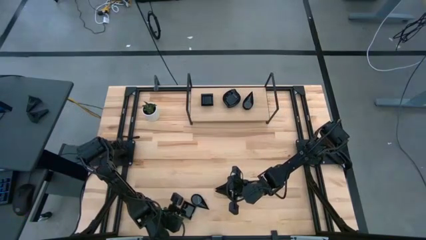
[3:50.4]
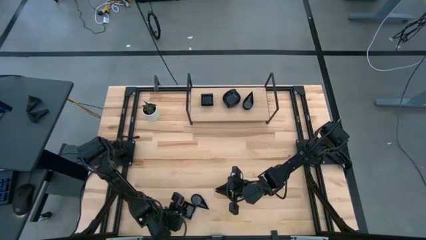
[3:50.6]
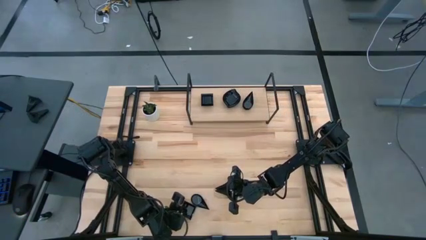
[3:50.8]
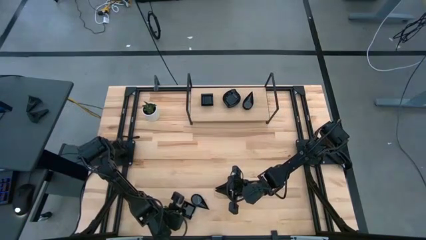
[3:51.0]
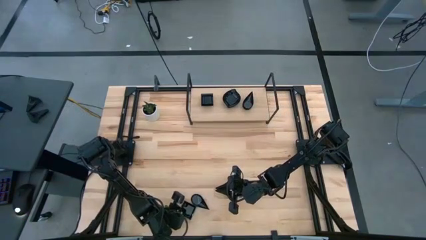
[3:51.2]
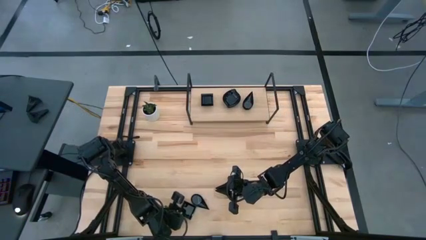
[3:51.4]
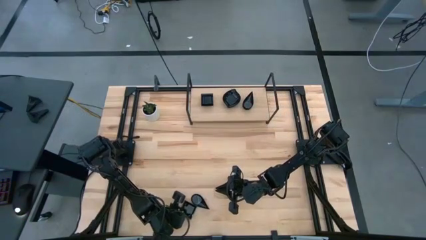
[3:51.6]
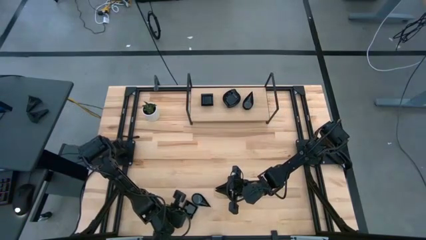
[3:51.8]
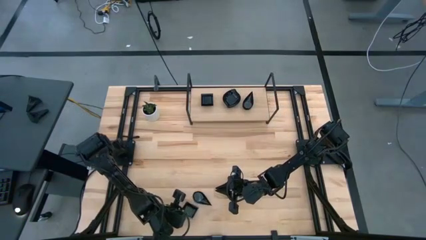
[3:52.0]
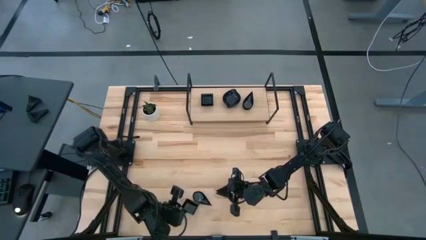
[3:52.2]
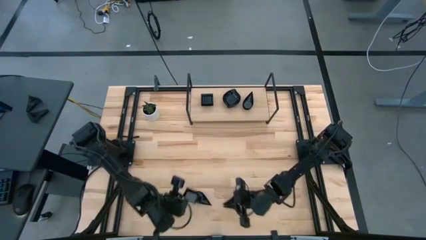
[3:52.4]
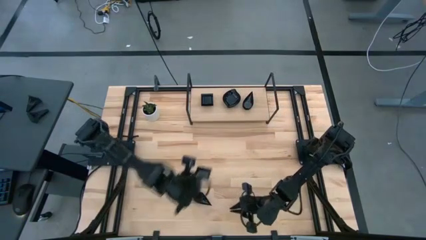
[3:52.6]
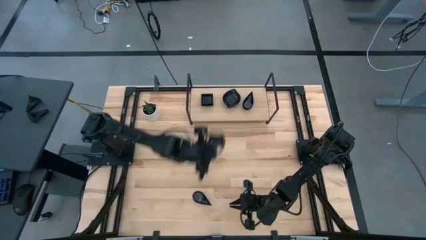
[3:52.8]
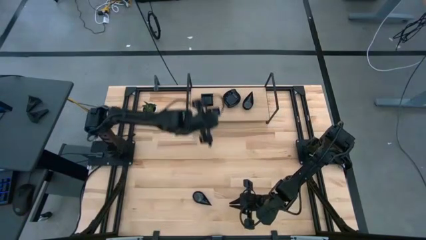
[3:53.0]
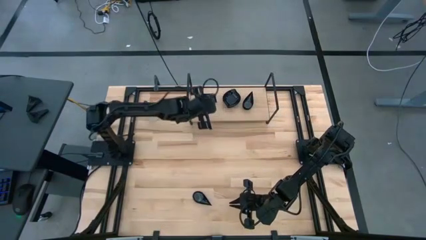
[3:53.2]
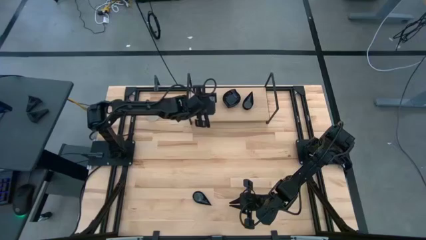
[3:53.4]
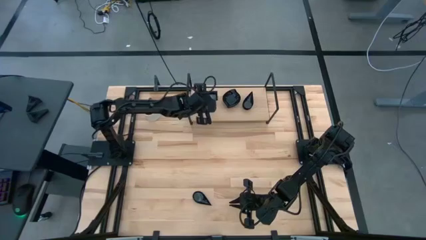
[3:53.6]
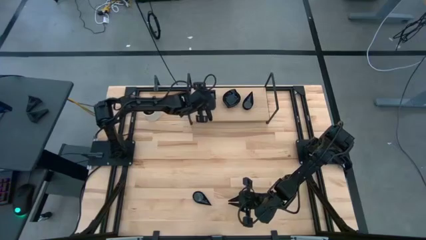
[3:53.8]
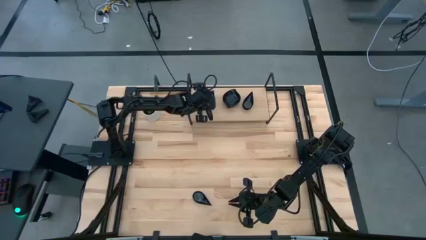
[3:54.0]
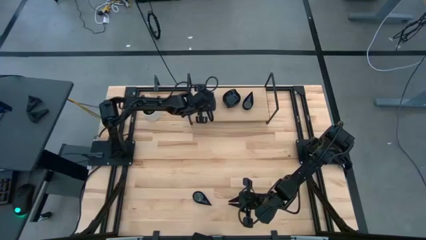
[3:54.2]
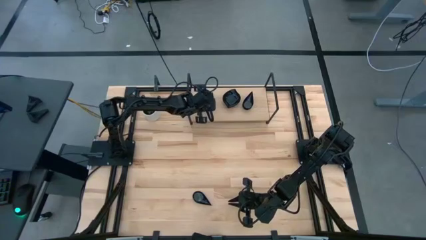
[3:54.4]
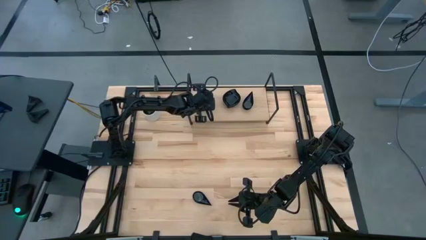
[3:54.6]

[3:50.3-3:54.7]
Task: Pick & Place Mini shaped plates
Stack the black square bowl on top of the other black square bowl on the shelf

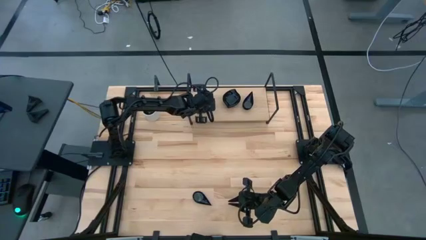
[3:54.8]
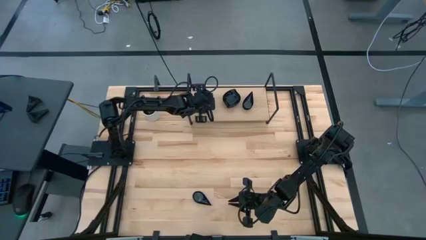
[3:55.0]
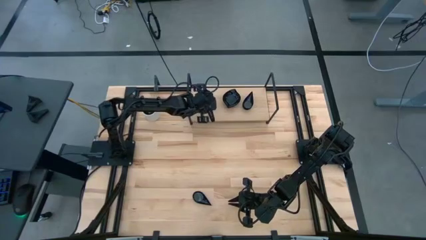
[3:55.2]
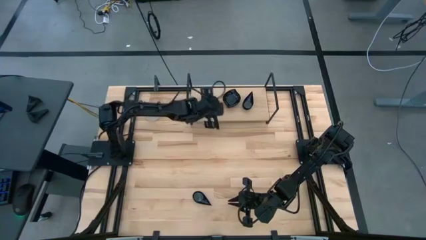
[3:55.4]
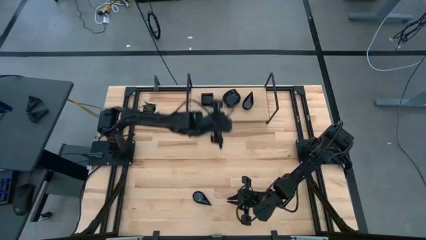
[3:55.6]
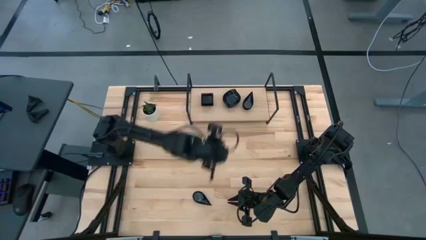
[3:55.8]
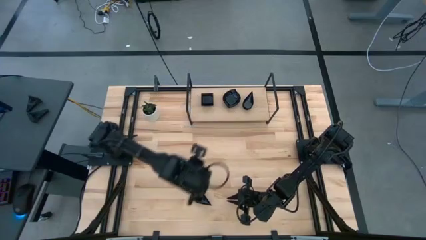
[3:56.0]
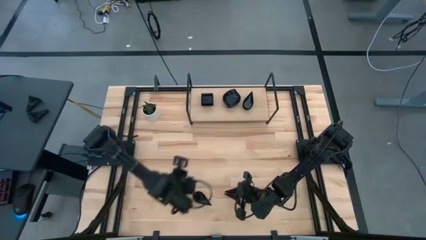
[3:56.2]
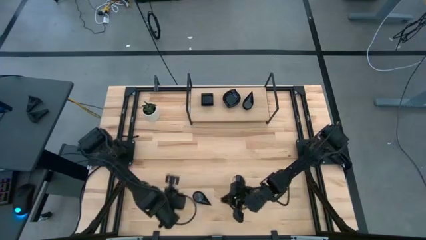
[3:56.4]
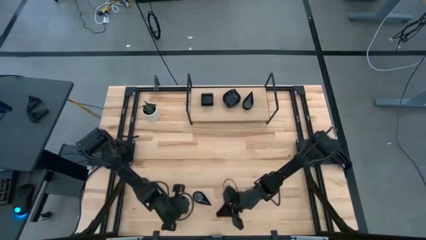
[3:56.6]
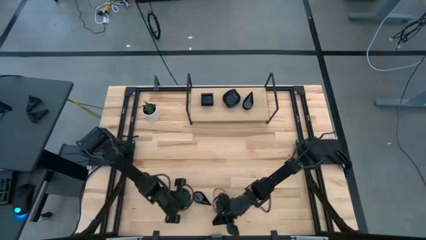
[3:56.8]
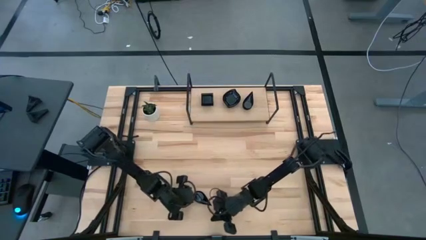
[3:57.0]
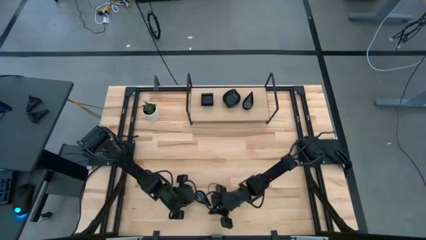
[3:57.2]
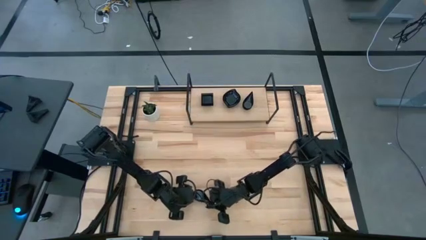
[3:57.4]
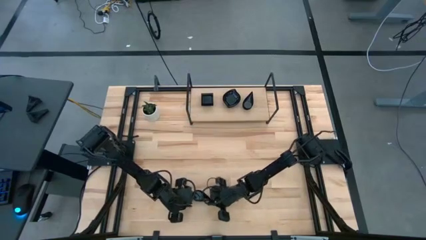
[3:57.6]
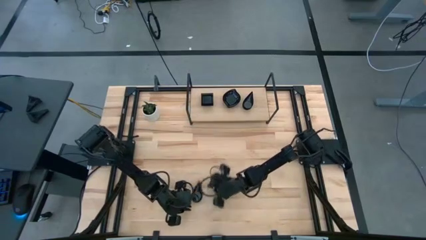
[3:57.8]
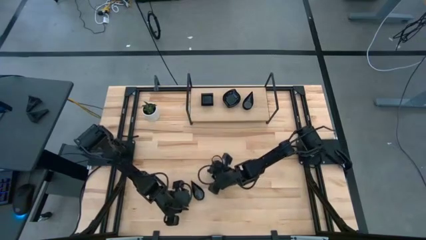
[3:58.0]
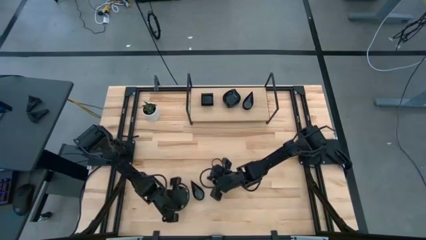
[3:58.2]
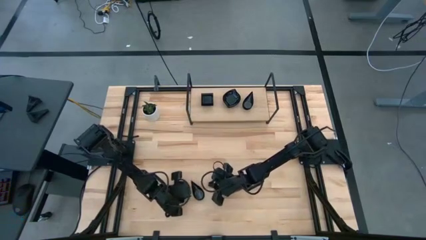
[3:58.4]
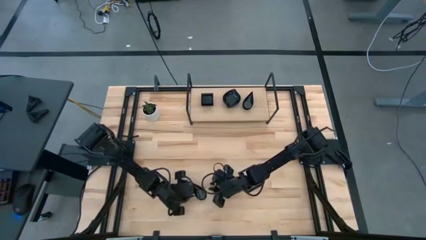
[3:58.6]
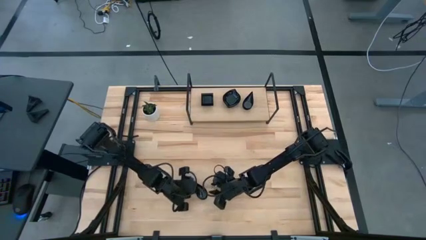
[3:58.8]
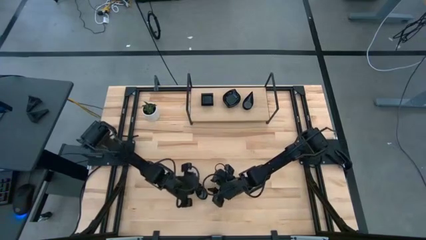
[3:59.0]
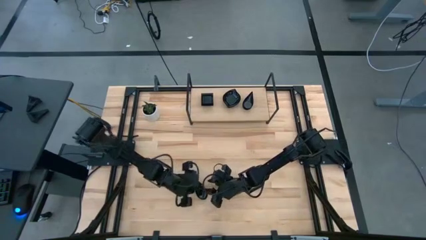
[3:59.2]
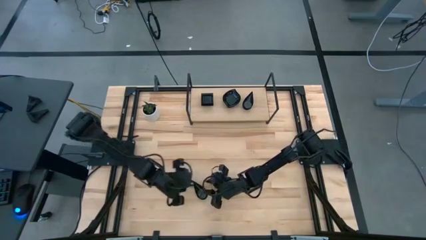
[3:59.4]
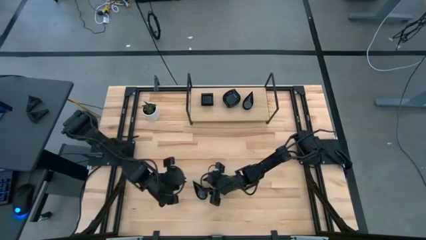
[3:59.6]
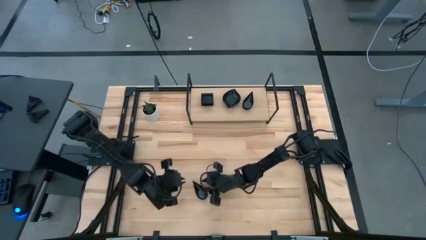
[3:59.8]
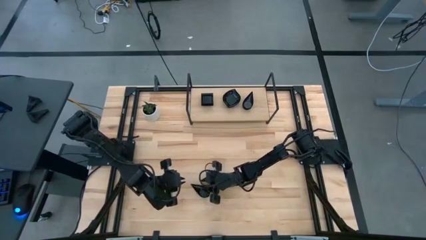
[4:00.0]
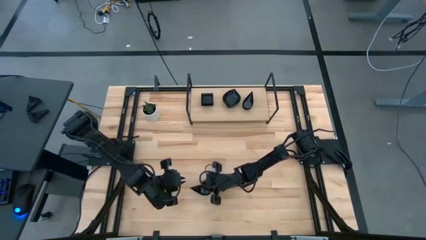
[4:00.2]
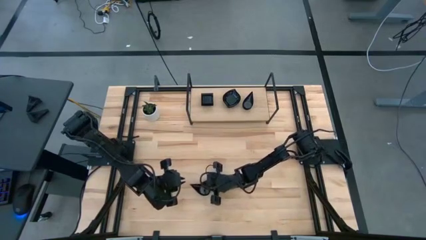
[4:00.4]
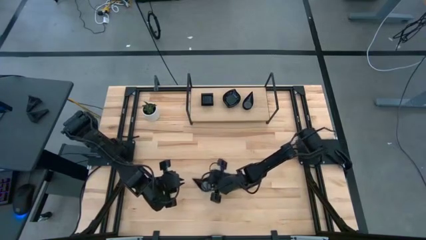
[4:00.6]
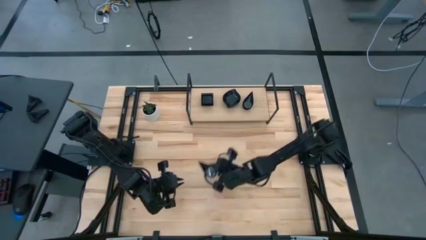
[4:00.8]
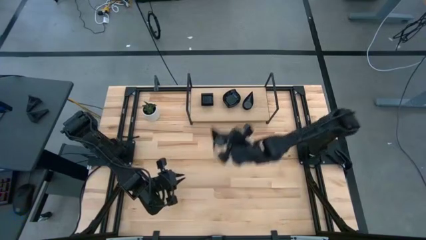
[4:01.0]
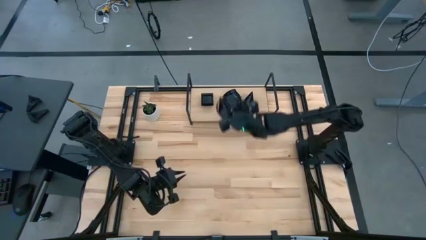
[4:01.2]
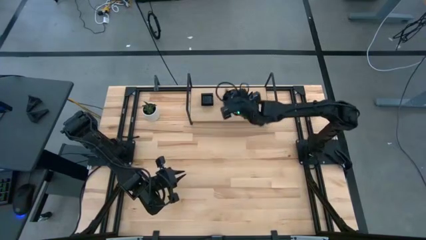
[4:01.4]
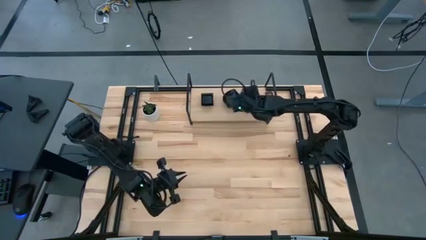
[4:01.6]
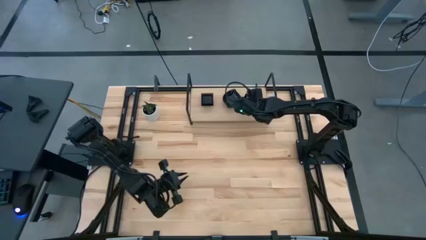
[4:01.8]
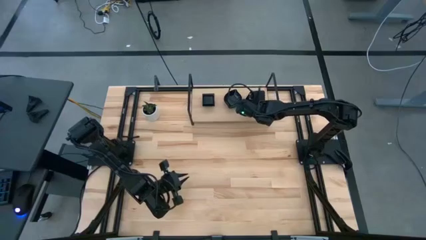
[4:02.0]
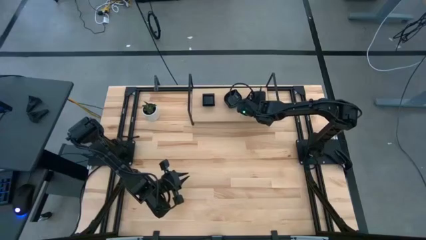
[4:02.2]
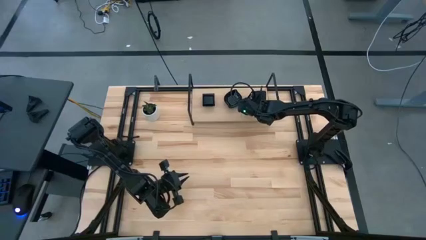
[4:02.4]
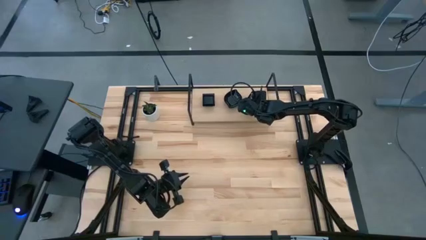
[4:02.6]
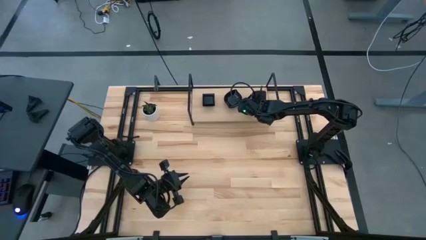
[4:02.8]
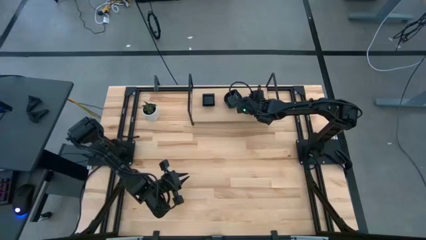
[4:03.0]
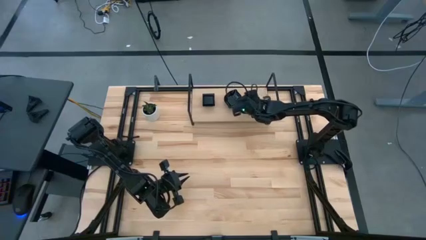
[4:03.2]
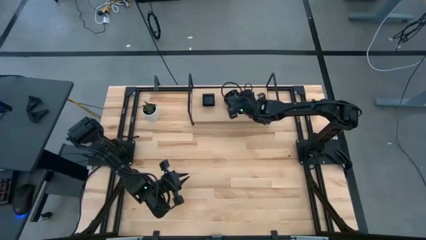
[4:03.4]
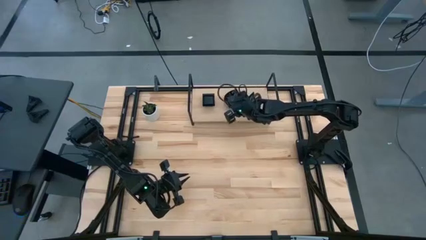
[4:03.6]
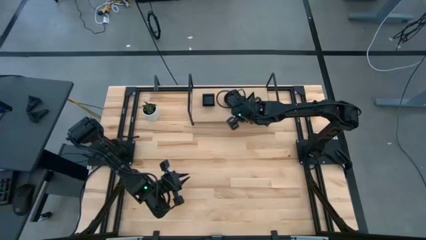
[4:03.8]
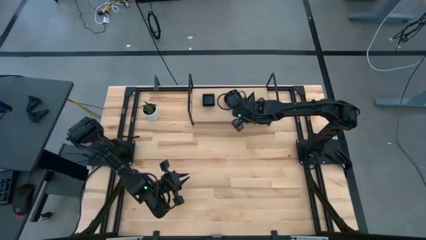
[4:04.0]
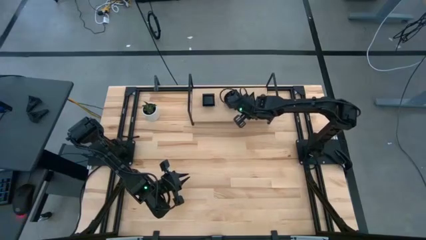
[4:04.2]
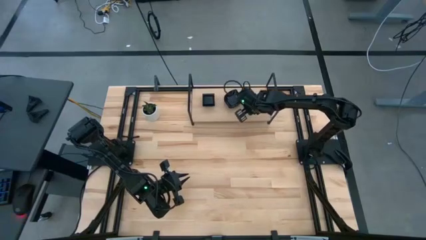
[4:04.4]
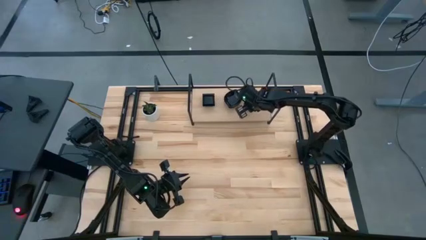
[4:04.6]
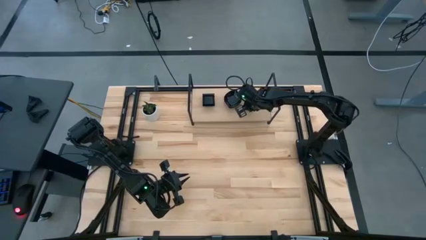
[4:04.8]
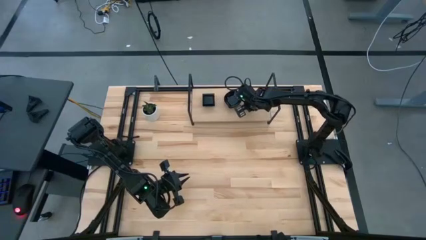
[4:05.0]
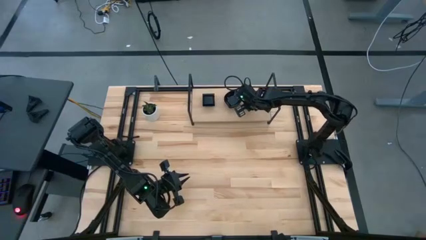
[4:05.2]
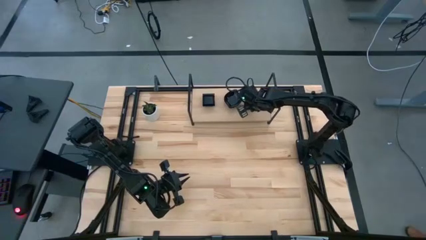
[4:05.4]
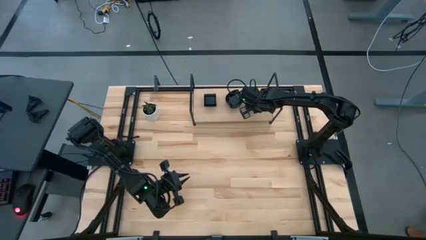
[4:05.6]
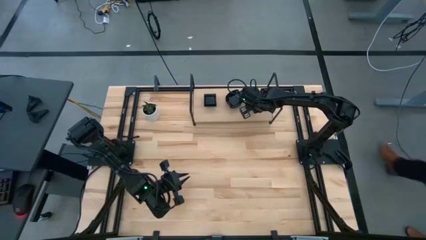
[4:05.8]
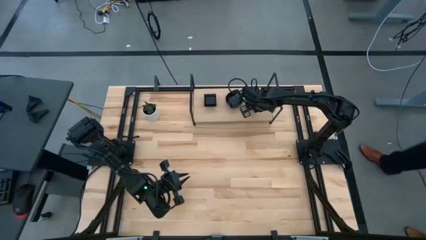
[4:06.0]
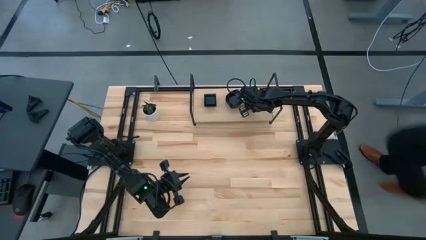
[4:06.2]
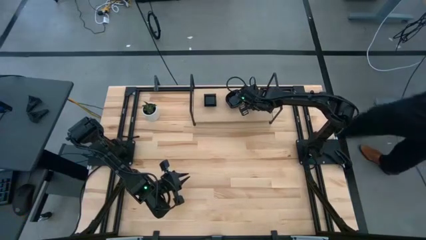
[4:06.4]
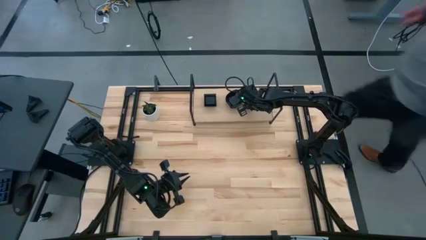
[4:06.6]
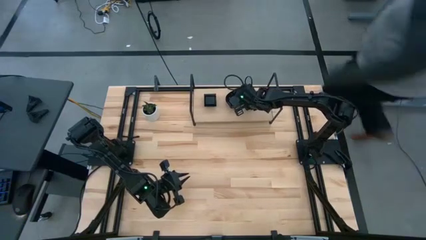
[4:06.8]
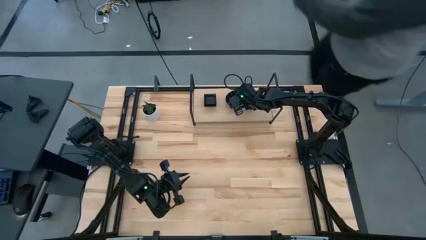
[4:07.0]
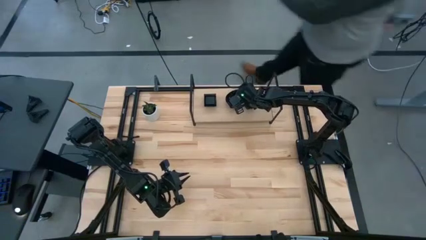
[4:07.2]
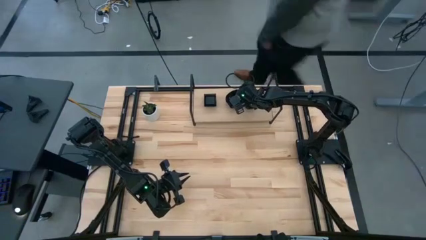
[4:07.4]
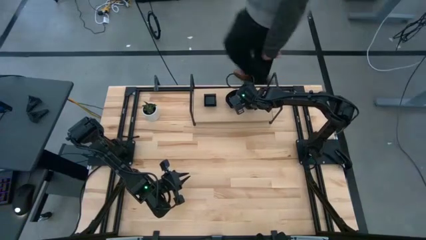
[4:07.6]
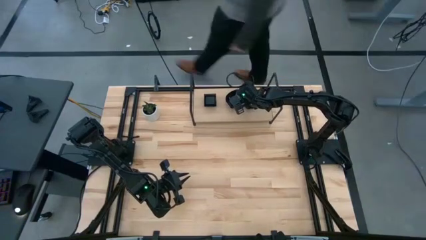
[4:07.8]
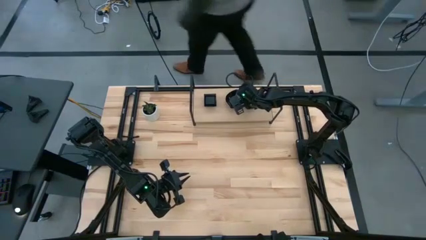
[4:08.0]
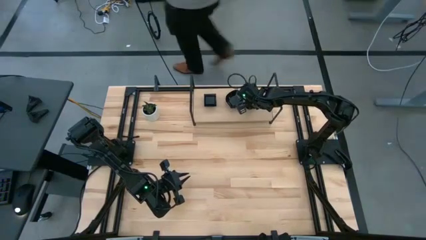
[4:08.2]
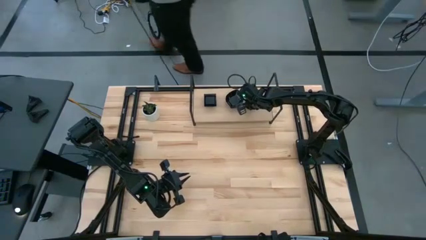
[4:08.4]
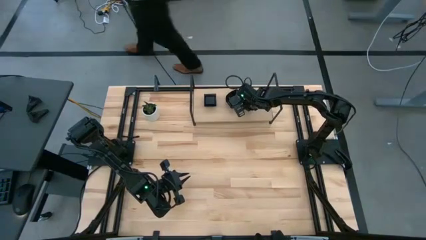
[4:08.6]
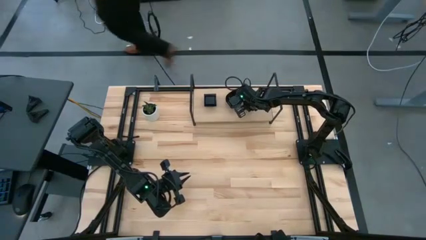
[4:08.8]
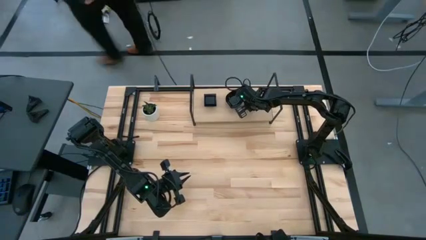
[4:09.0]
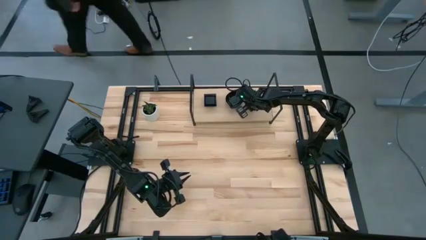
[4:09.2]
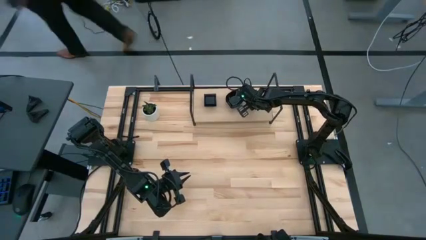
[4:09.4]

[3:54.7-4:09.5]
Stack the black teardrop shaped bowl on top of the other black teardrop shaped bowl on the shelf
